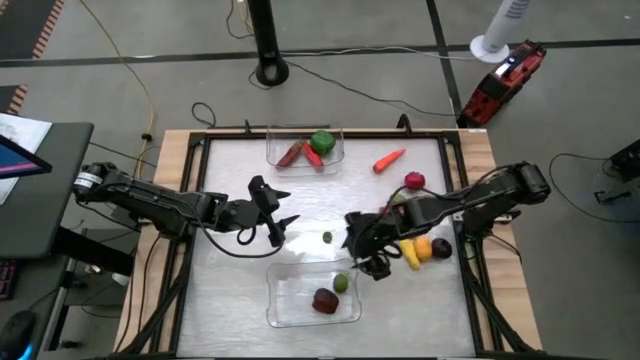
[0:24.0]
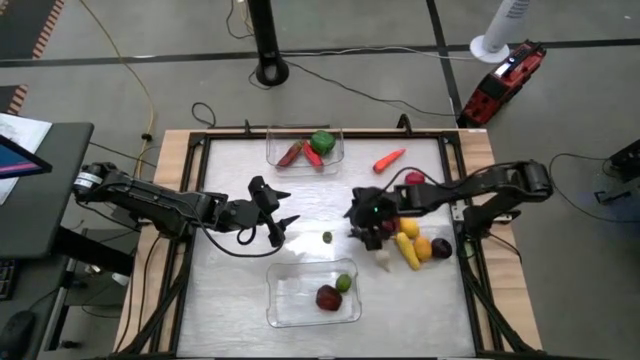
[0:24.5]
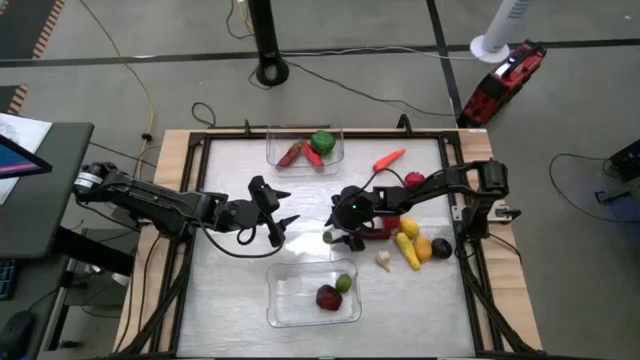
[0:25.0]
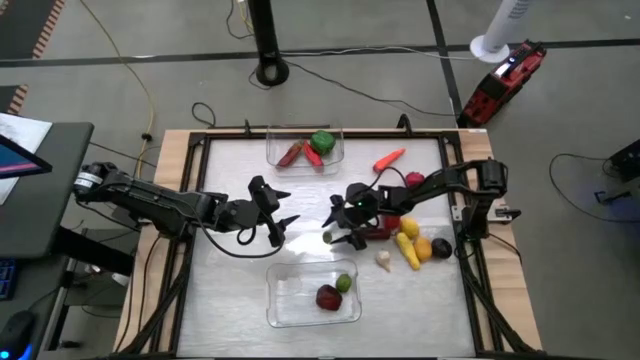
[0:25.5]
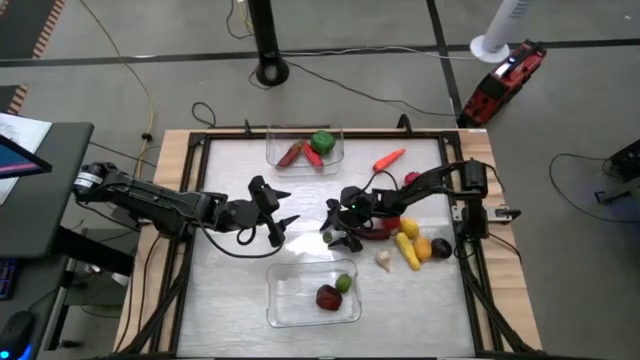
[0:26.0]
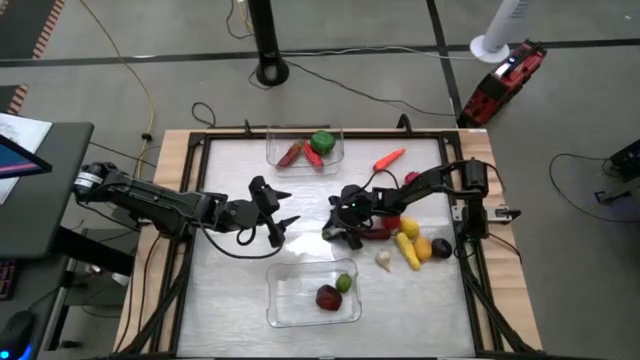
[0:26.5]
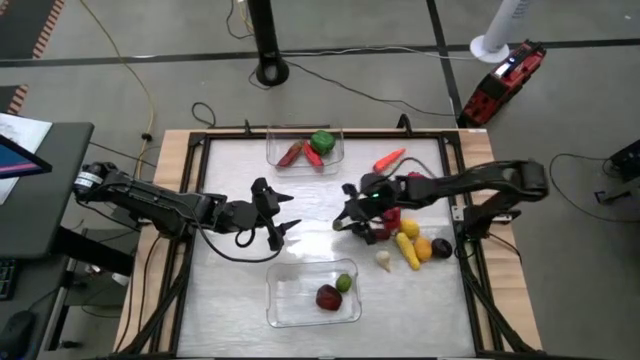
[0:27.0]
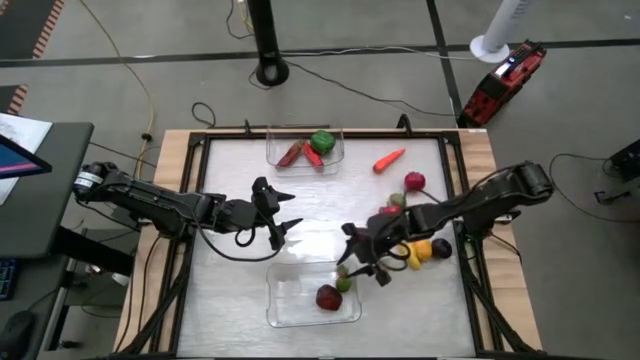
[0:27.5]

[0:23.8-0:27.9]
Task: Sort produce into baskets
Put the strawberry into the bottom transparent bin

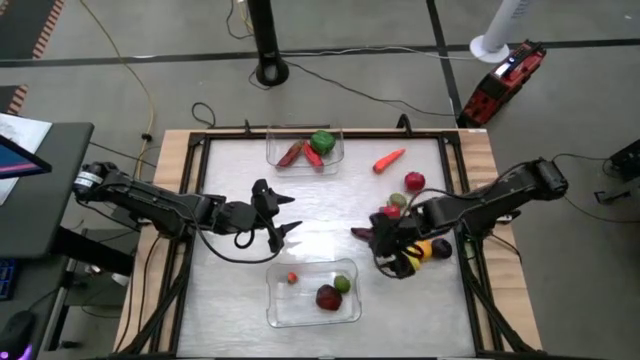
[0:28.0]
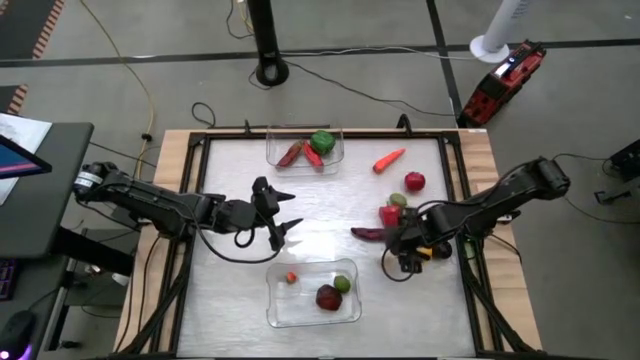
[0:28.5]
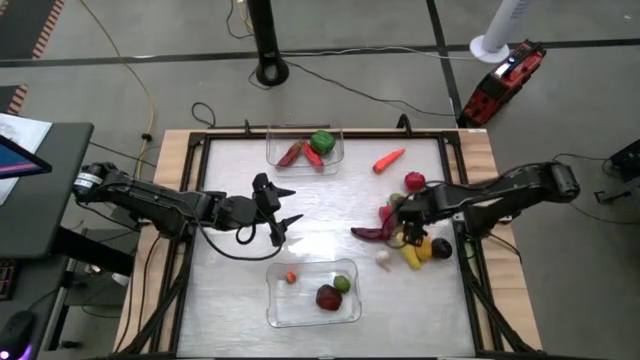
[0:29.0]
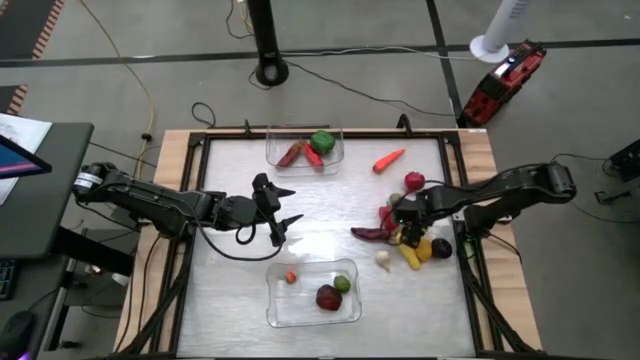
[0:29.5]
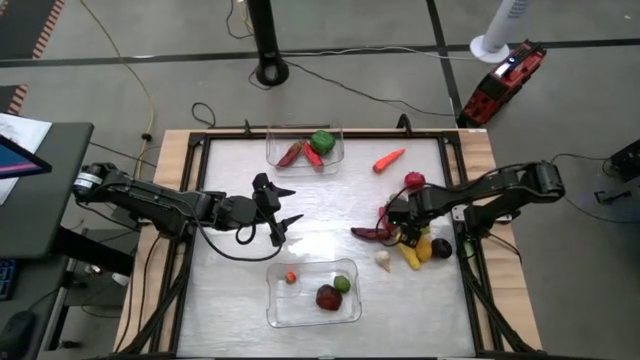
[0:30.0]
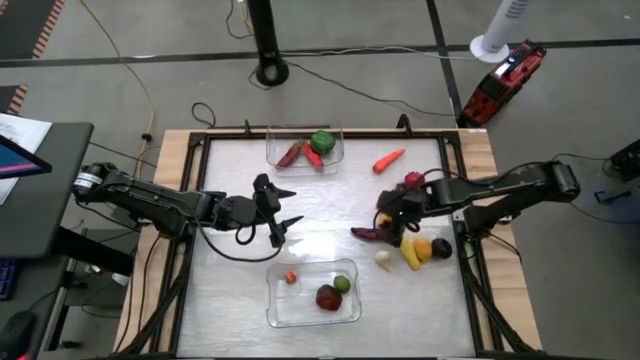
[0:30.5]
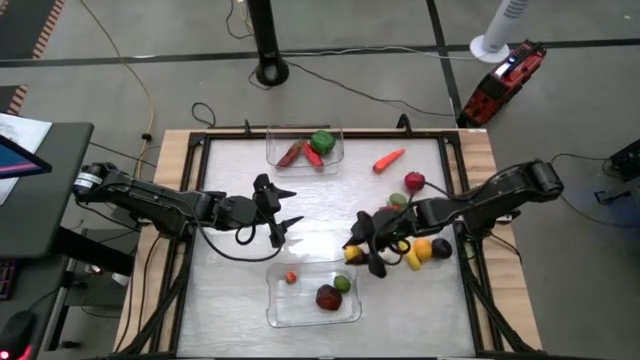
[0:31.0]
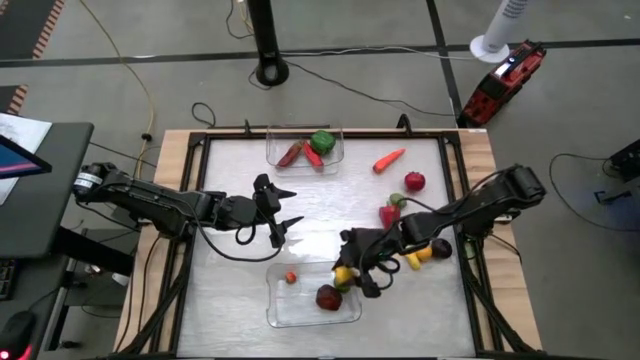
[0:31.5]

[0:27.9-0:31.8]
Put the right lemon into the bottom transparent bin

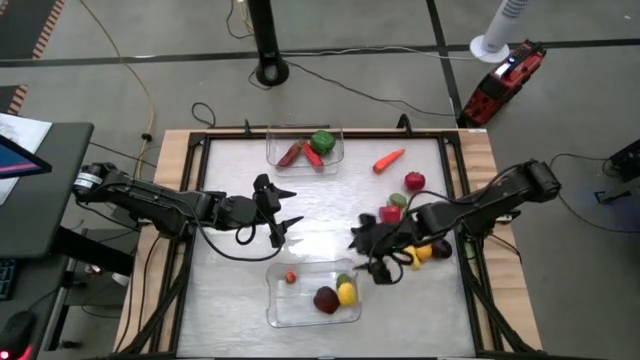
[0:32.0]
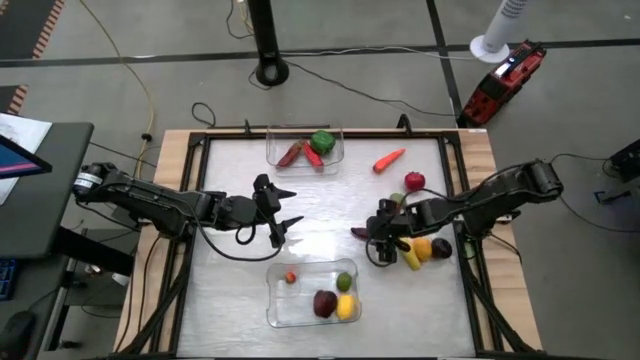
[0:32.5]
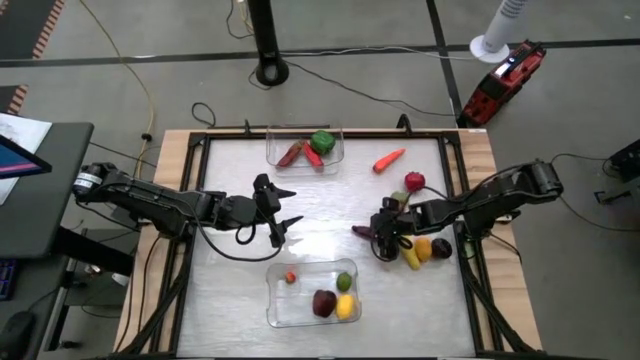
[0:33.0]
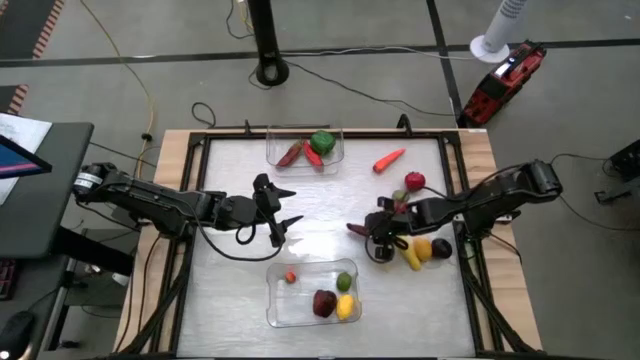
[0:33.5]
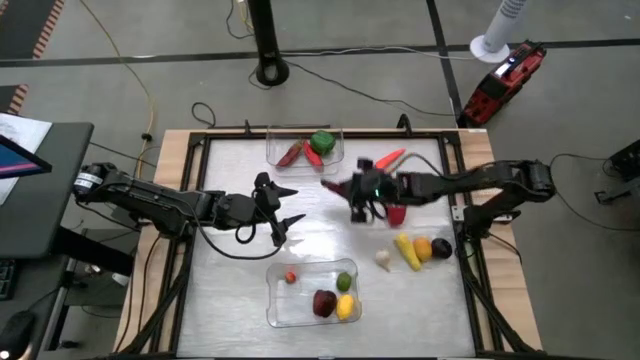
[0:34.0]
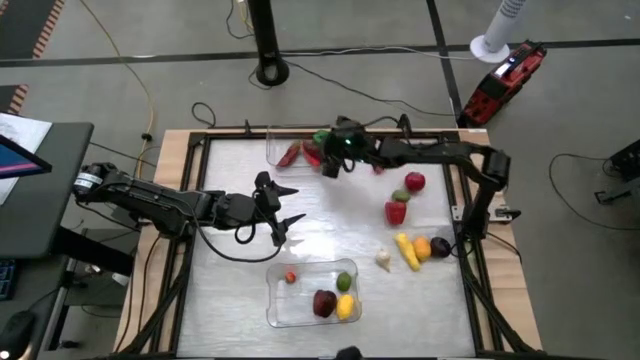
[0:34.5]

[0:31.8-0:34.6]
Put the red pepper into the top transparent bin

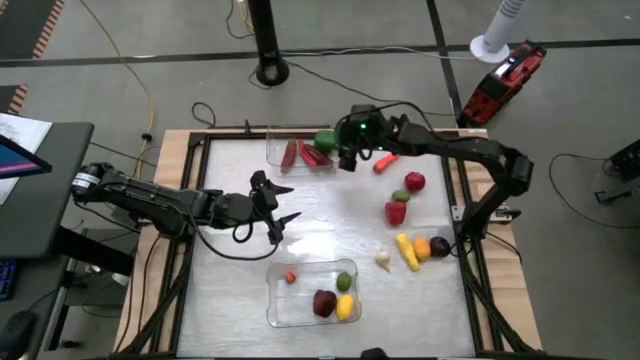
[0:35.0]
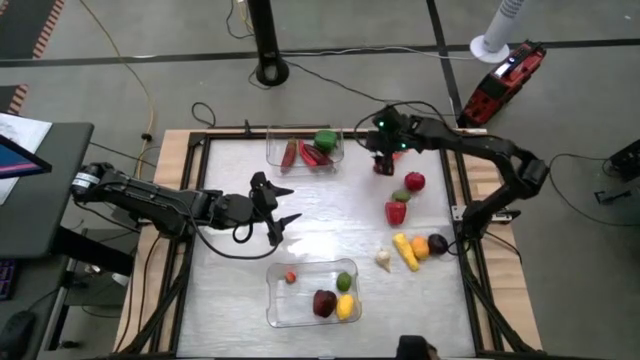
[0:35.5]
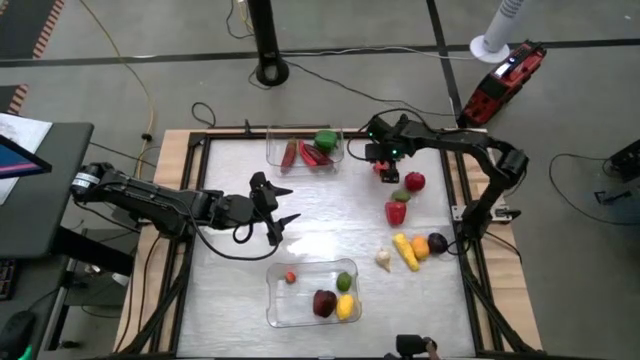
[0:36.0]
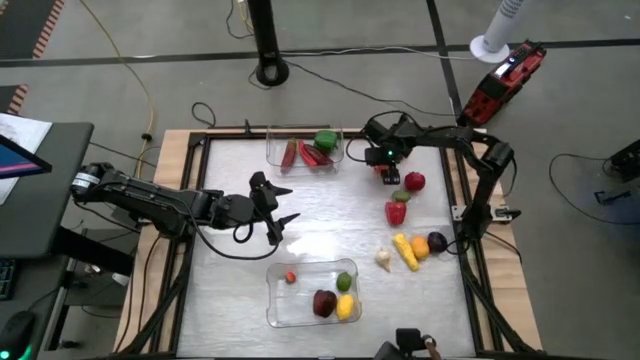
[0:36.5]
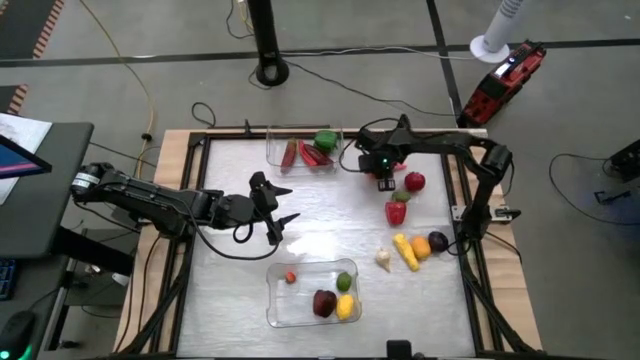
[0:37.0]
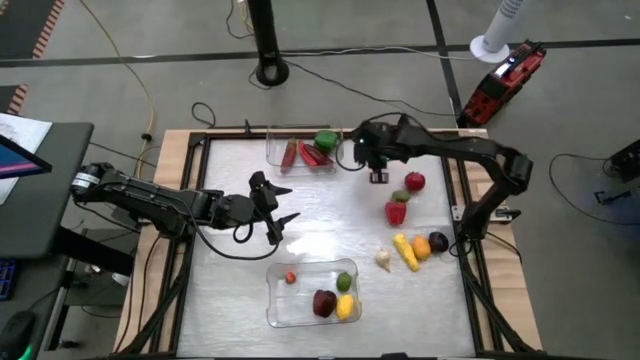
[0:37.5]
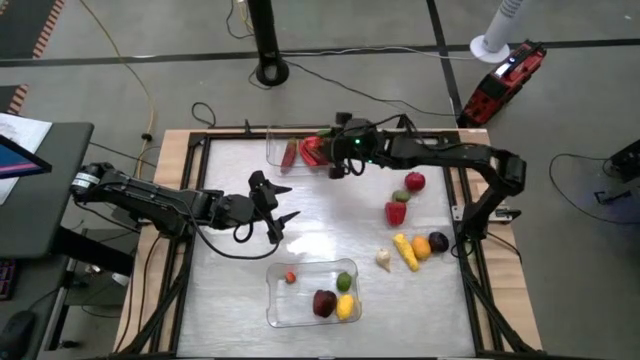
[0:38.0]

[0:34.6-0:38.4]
Put the carrot into the top transparent bin

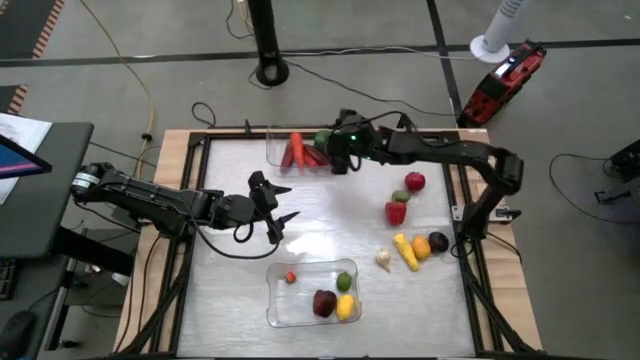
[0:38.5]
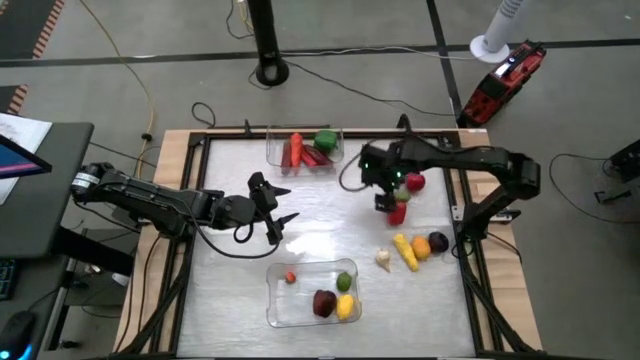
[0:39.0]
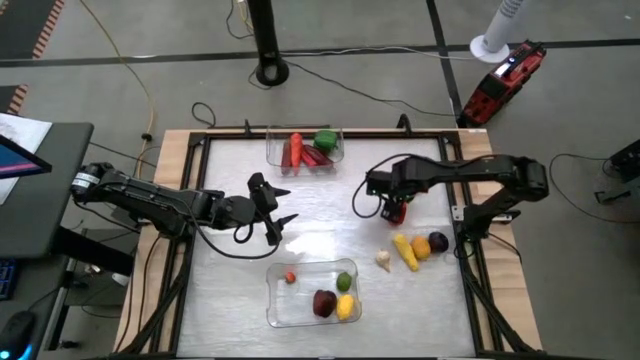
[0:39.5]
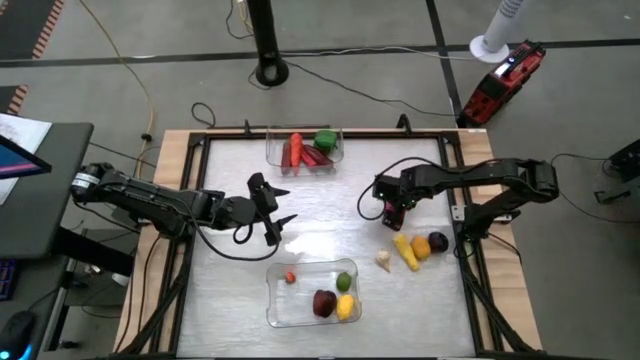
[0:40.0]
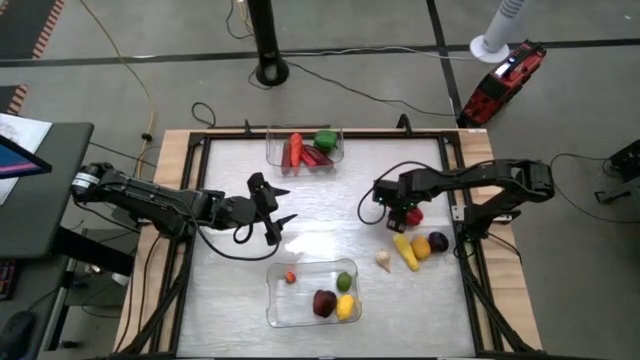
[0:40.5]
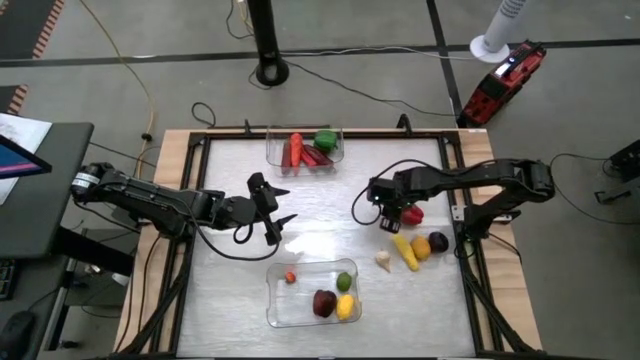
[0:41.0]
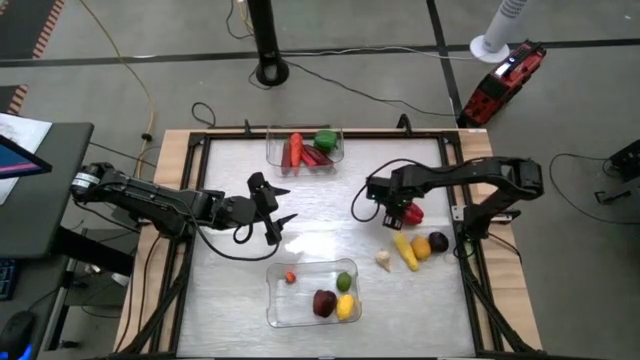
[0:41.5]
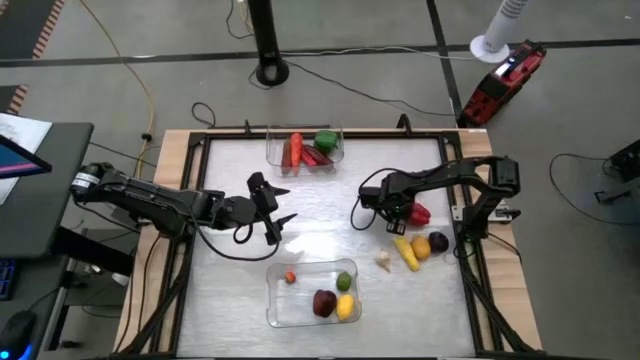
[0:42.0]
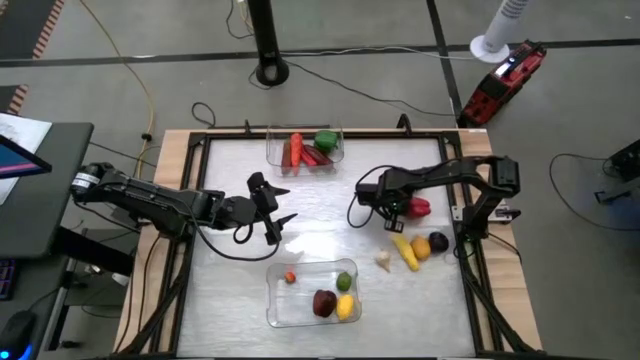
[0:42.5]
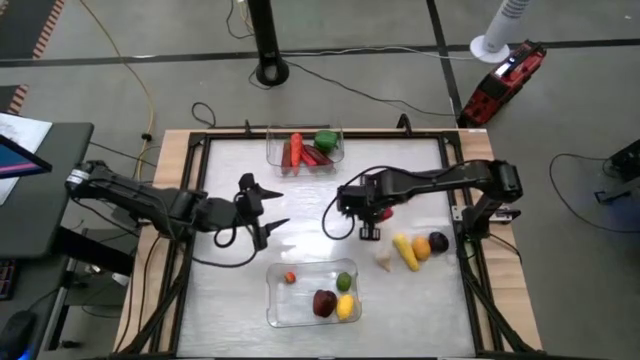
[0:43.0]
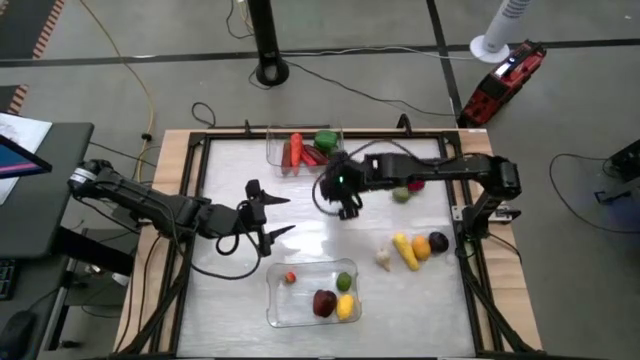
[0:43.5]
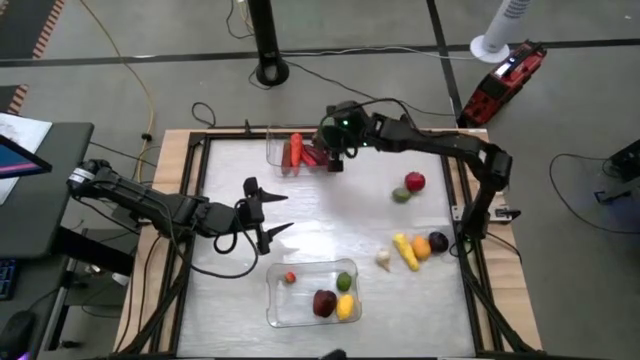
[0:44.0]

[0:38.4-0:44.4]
Put the red bell pepper into the top transparent bin

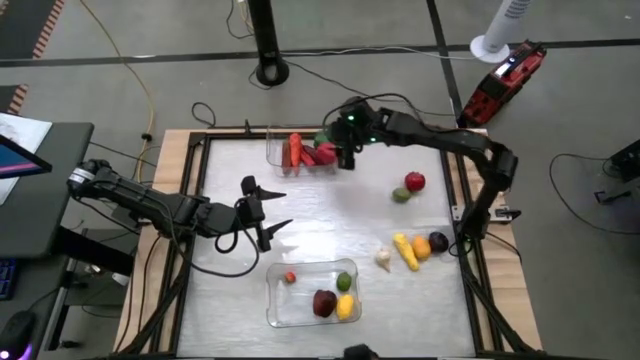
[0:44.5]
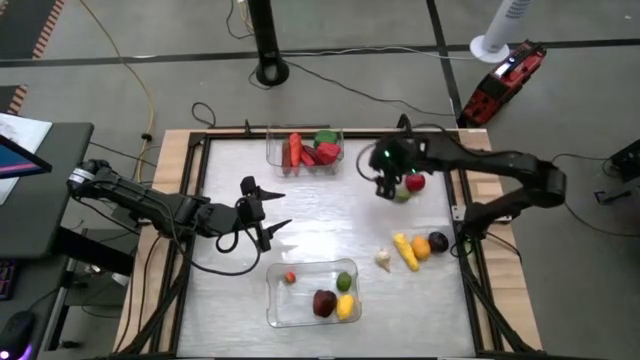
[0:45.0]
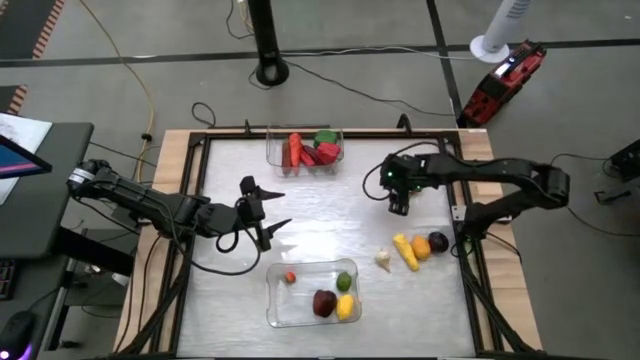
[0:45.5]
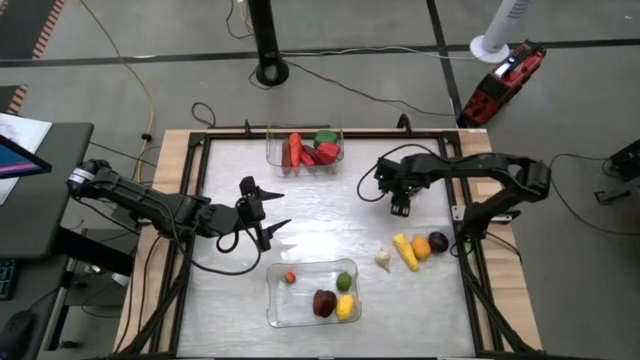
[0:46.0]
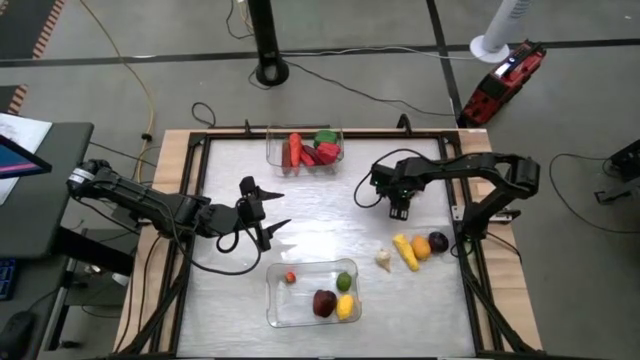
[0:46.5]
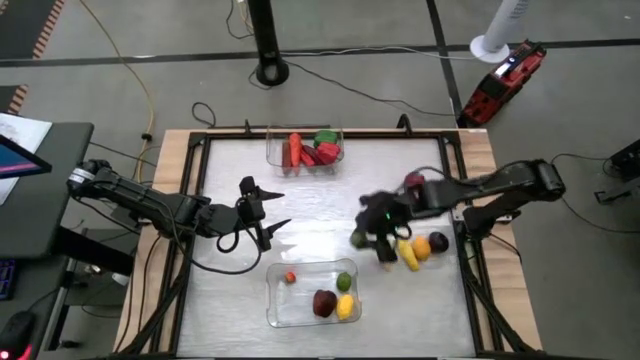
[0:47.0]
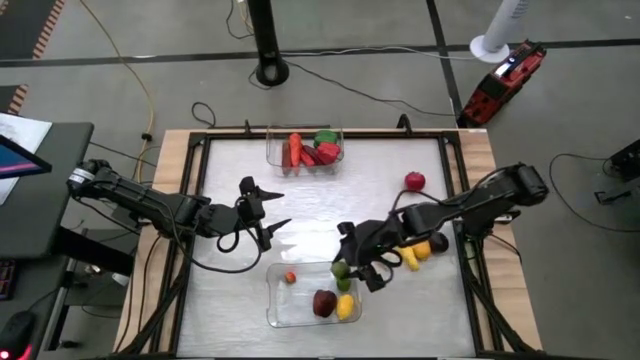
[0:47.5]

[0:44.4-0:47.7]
Put the lime into the bottom transparent bin
